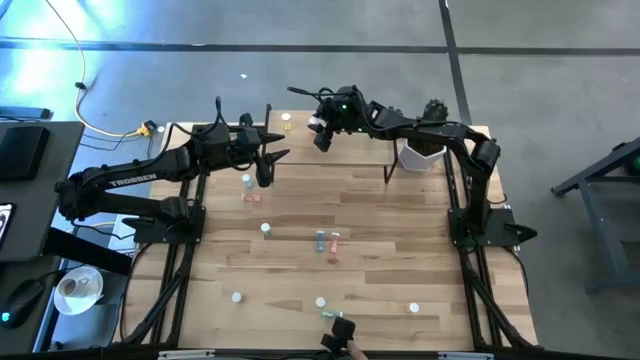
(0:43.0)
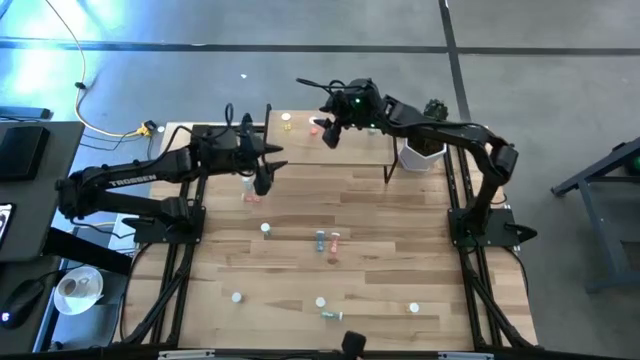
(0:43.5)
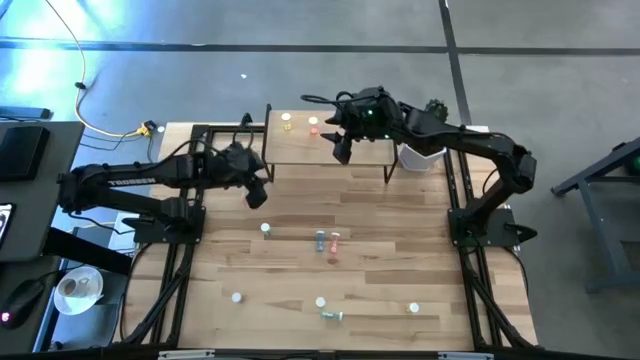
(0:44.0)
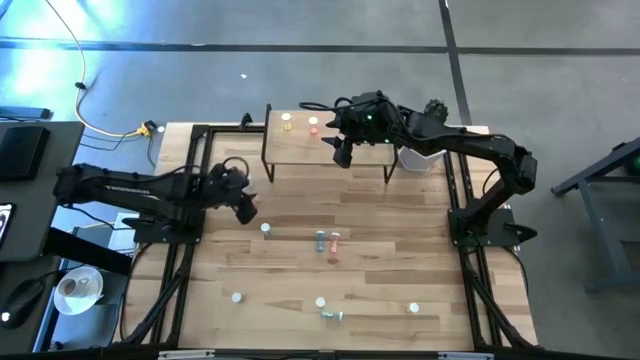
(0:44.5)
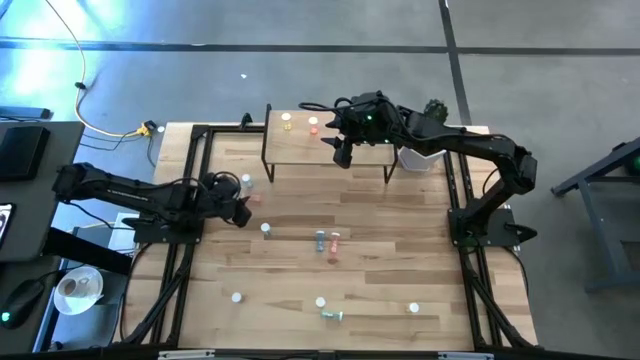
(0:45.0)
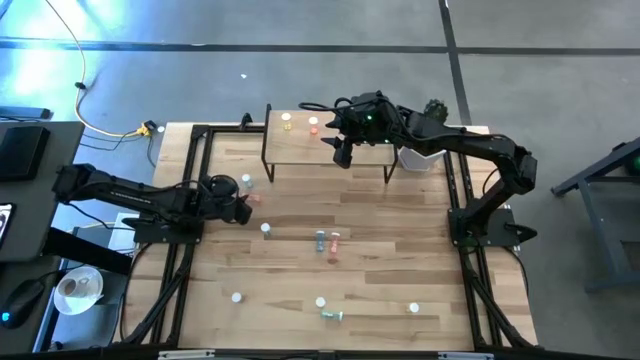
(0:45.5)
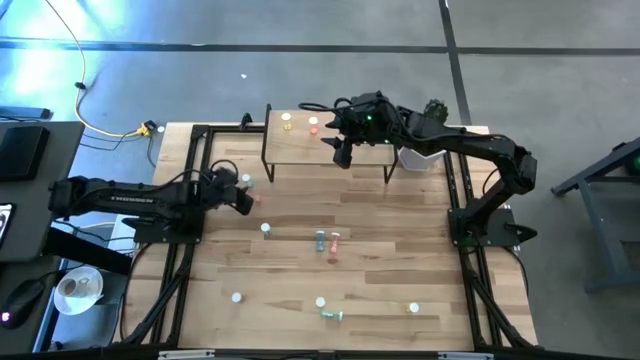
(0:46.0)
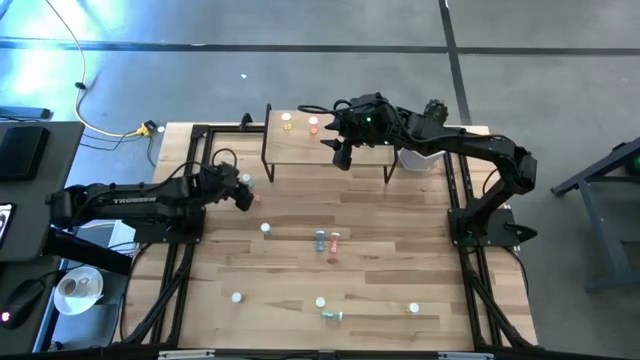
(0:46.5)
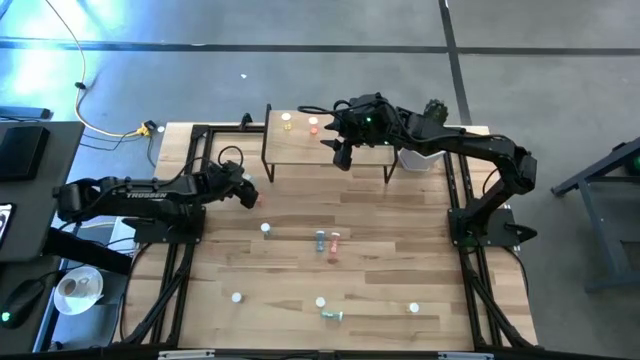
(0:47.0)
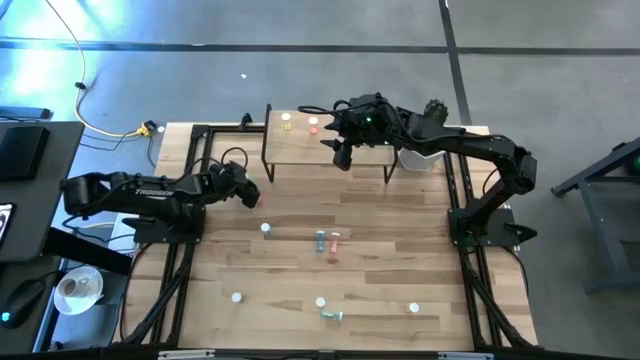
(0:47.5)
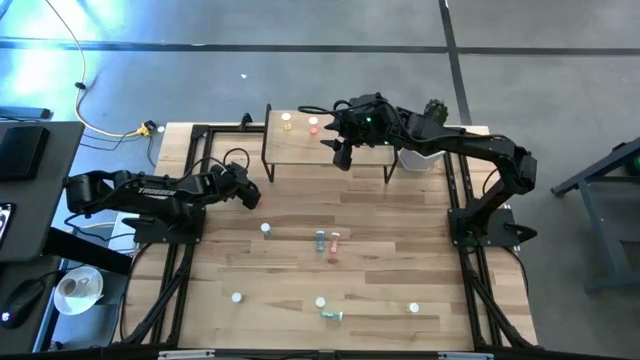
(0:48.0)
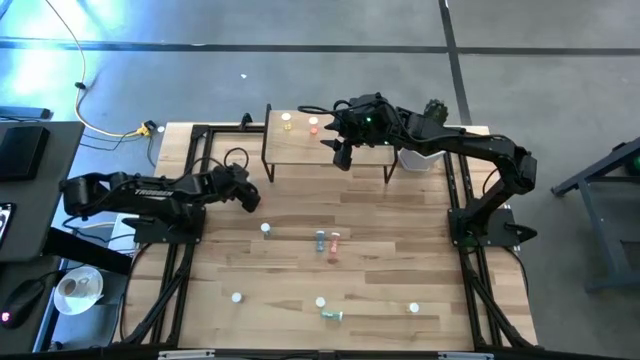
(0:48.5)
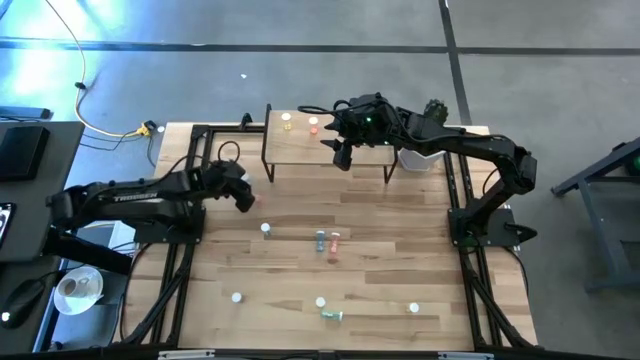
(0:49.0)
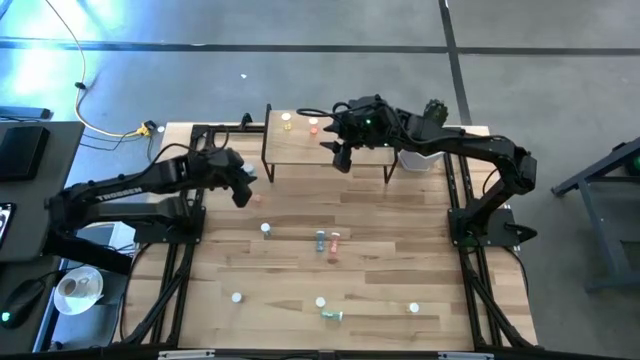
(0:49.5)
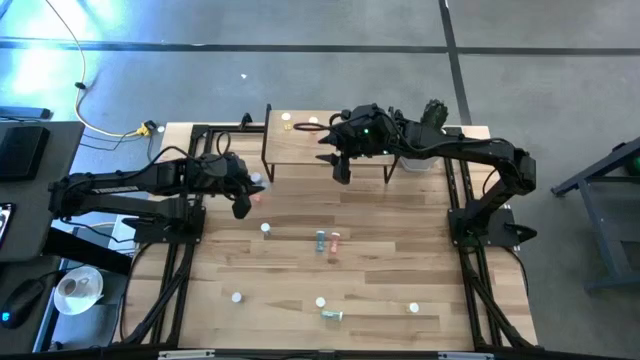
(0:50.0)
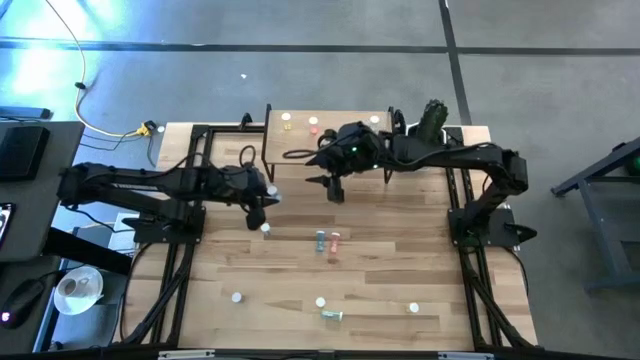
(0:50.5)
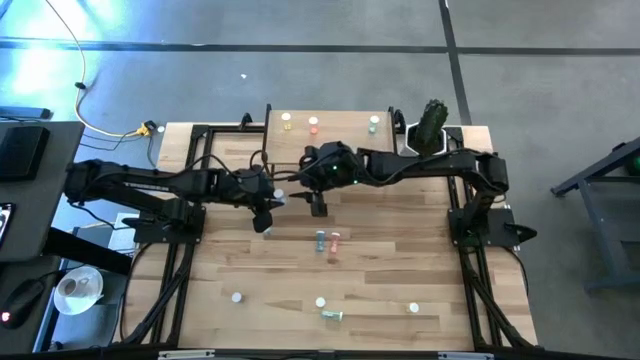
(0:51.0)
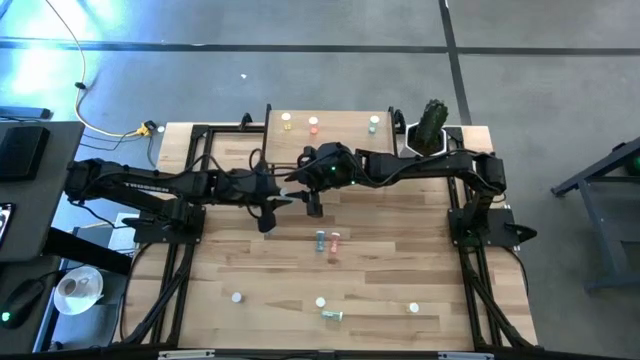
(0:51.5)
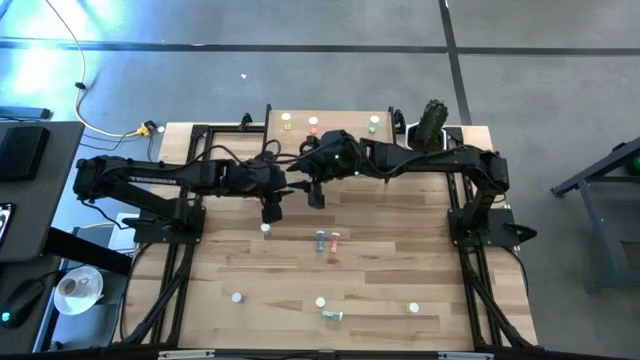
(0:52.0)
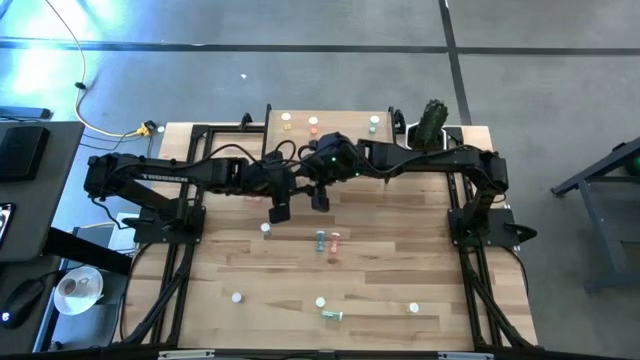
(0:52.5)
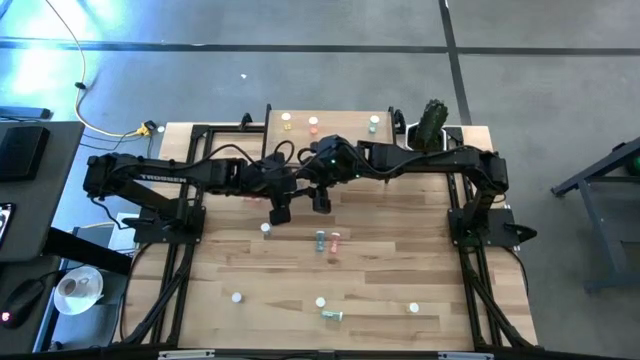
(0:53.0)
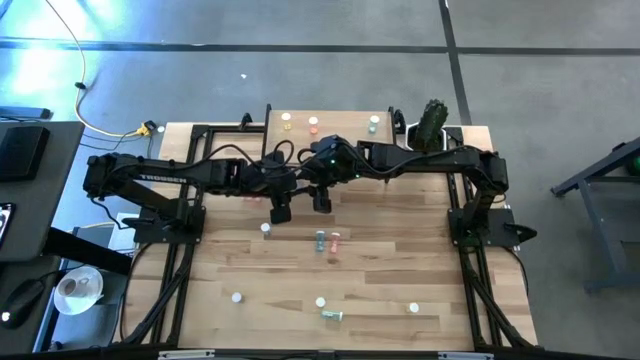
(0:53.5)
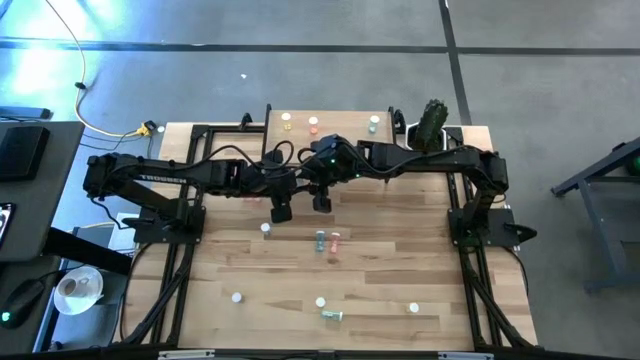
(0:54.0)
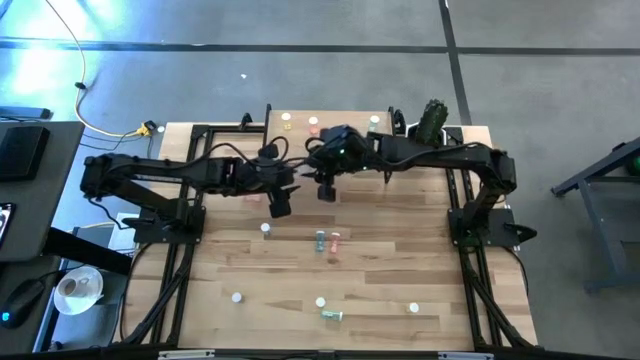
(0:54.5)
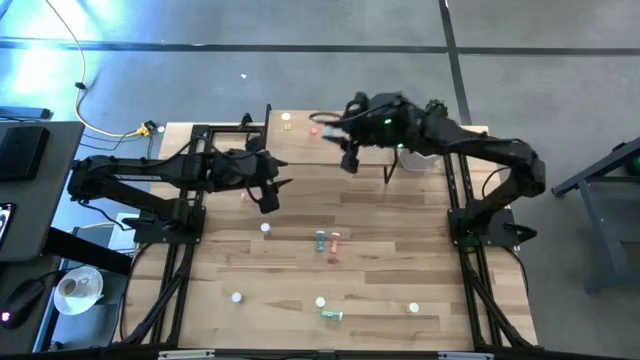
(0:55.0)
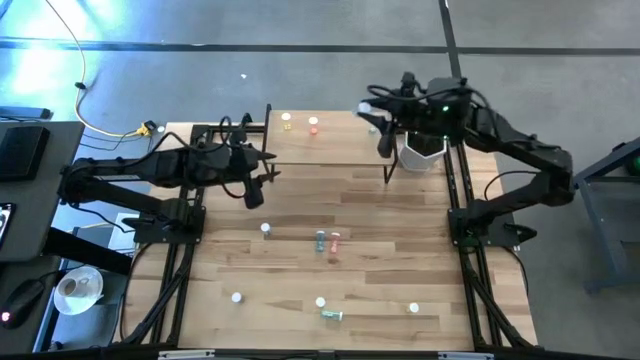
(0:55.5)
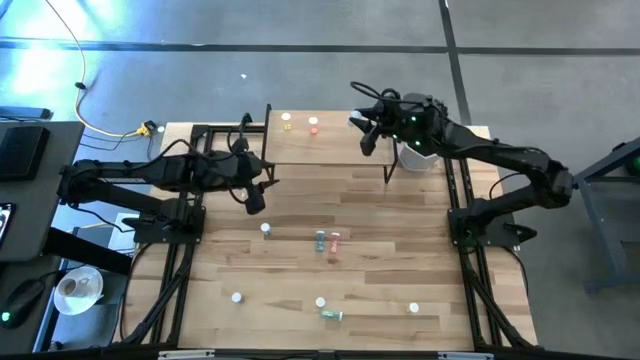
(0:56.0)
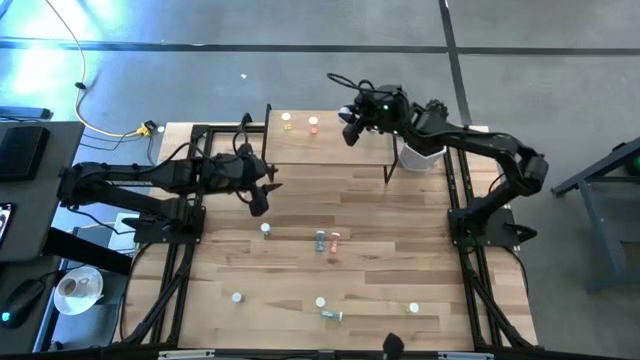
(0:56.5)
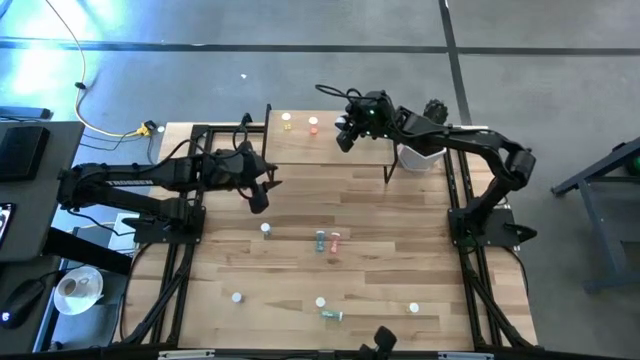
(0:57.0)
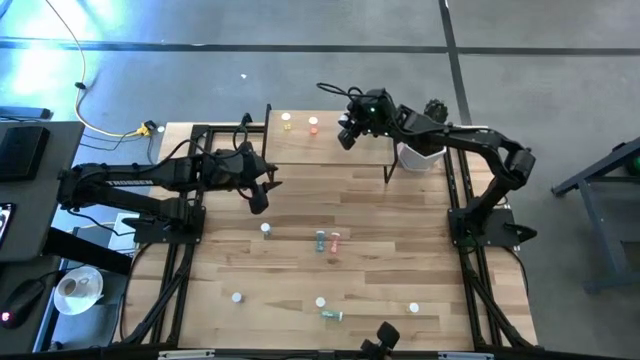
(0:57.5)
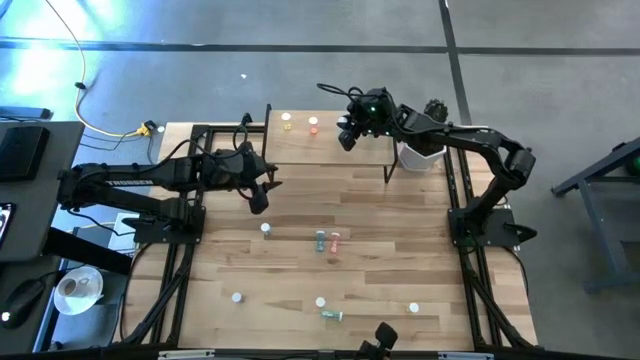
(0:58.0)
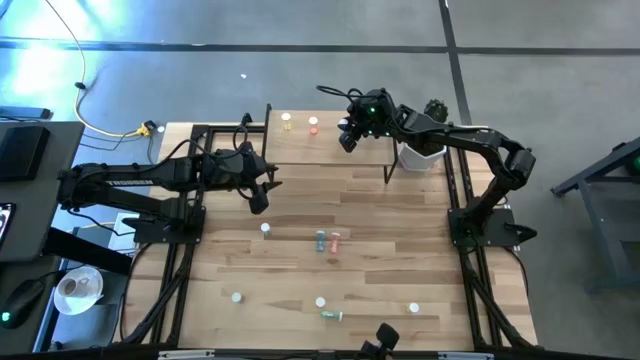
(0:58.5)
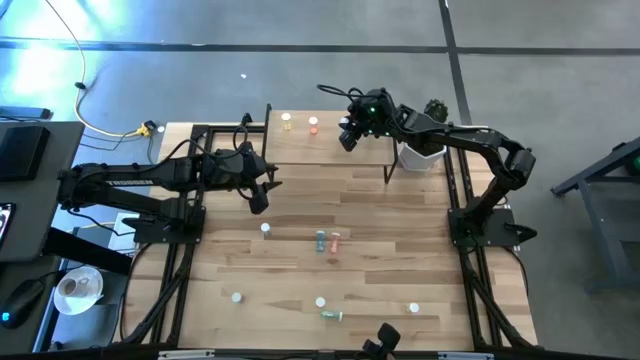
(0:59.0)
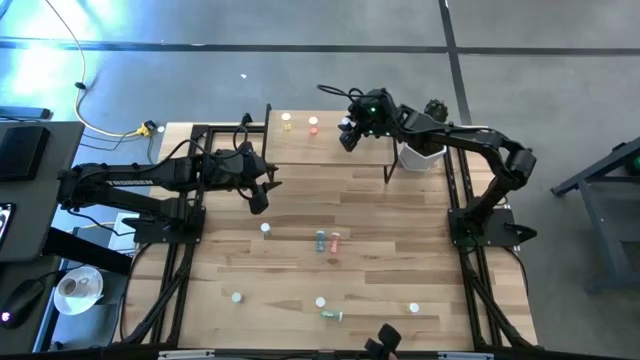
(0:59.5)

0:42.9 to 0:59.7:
Task: Pick and place medicine bottles onto shelf by color
Put the top left blue pill bottle on the shelf

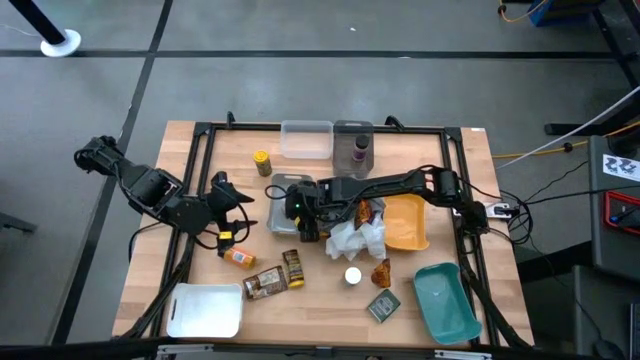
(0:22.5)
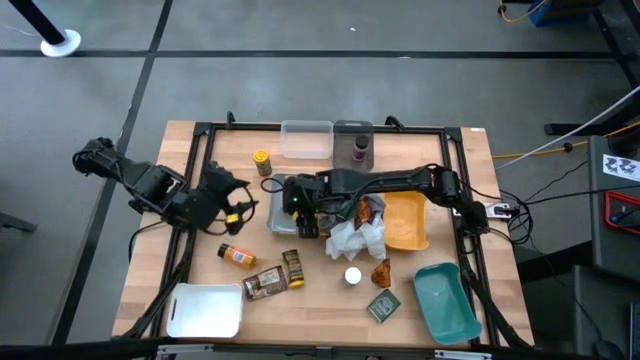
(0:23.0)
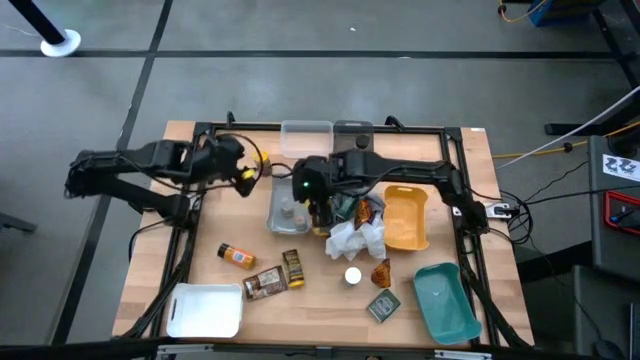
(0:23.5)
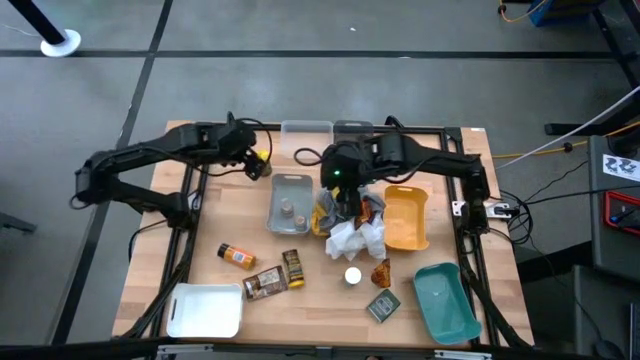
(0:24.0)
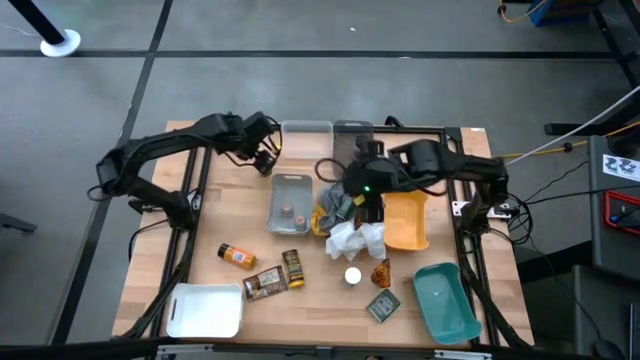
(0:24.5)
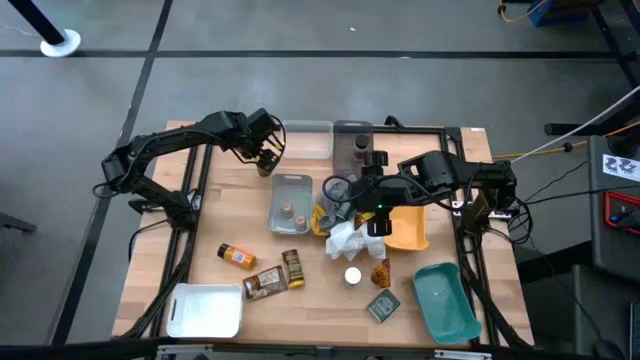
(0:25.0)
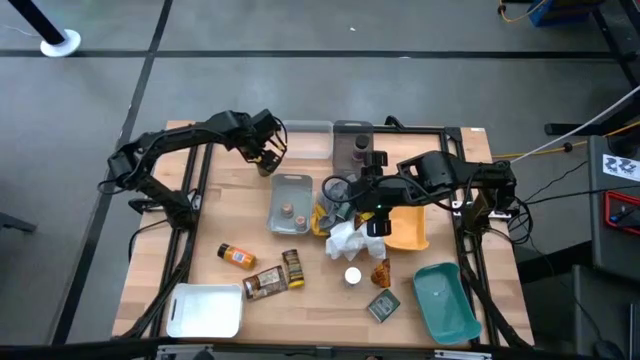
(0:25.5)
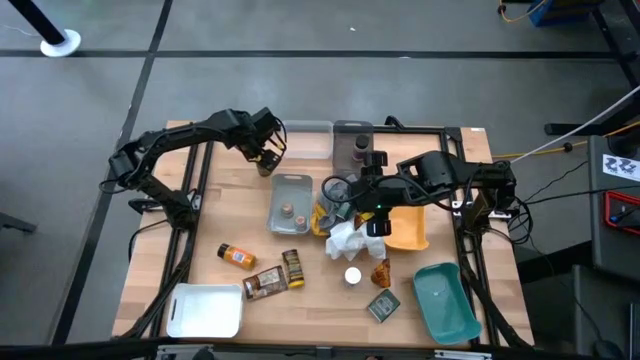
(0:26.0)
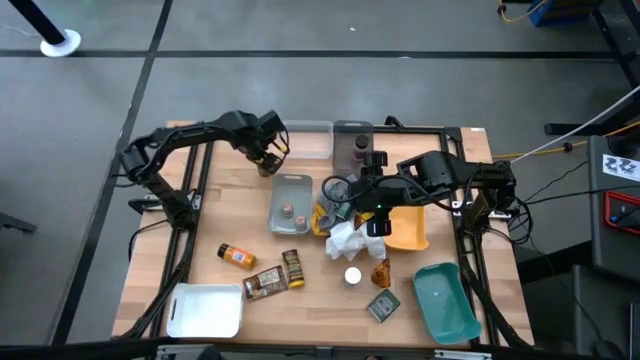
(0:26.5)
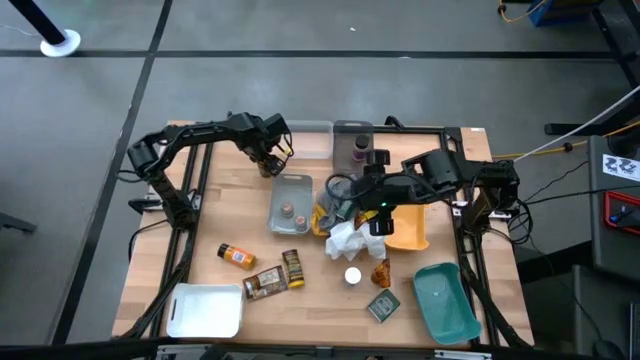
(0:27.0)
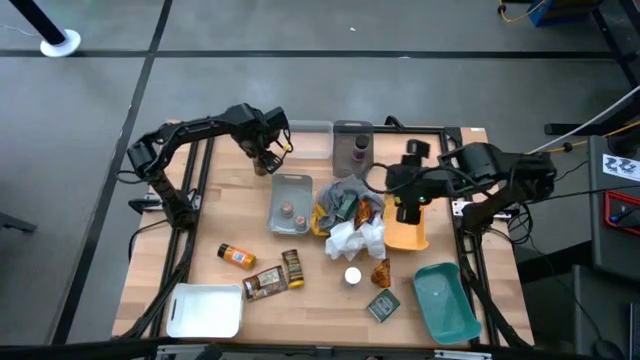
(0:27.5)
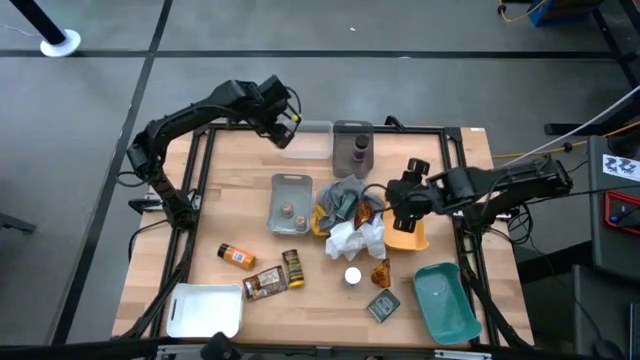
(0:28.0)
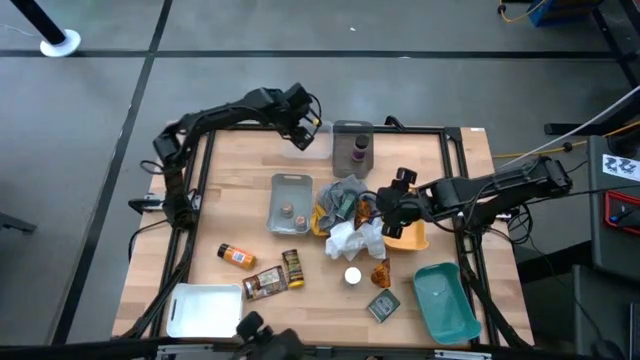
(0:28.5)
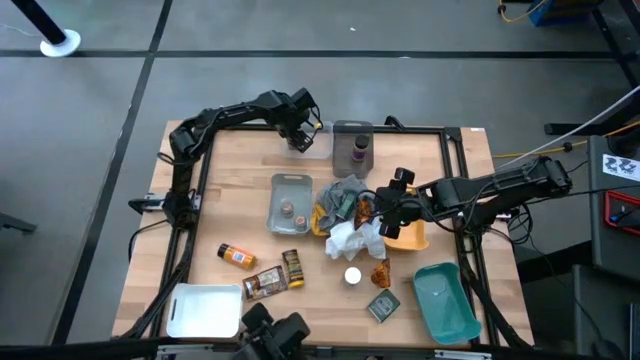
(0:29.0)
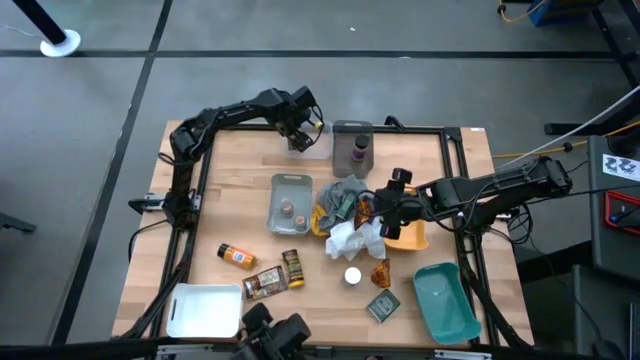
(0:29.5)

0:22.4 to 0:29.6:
Task: Sort spices by type
Put the top yellow seasoning bottle into the transparent bin
